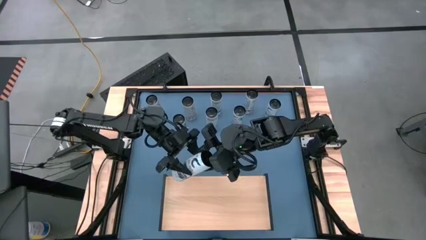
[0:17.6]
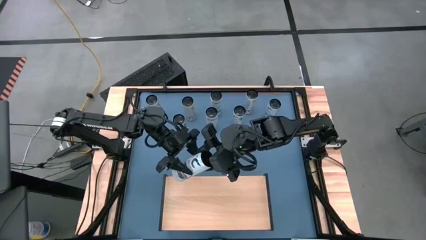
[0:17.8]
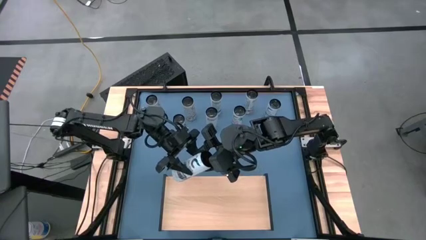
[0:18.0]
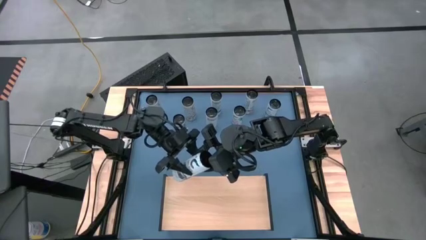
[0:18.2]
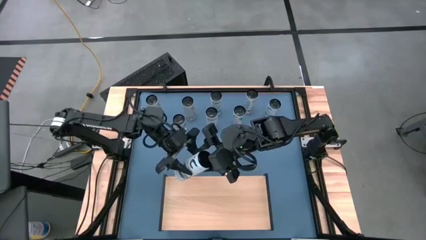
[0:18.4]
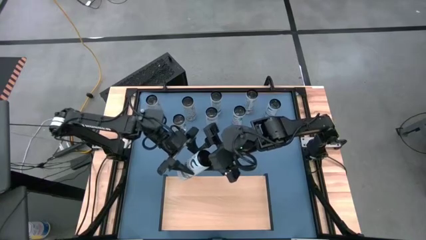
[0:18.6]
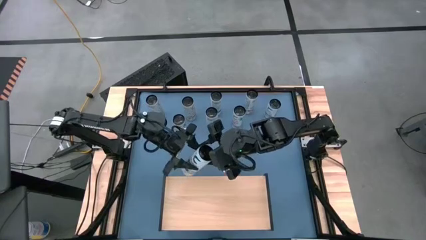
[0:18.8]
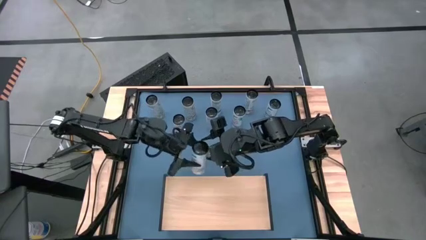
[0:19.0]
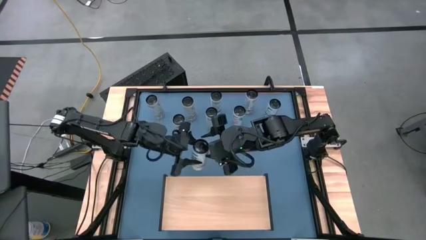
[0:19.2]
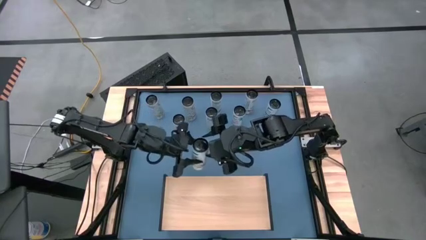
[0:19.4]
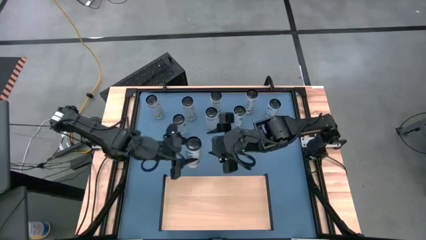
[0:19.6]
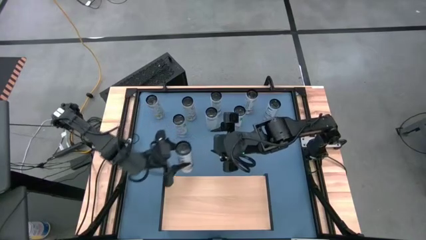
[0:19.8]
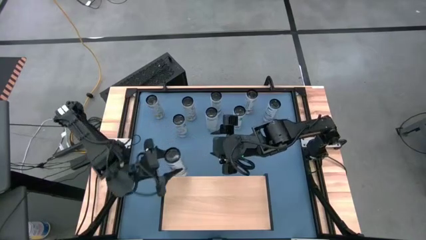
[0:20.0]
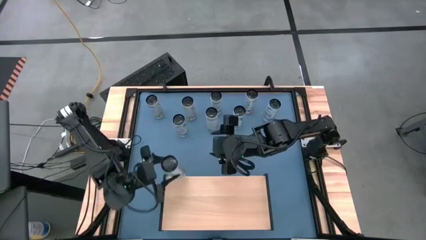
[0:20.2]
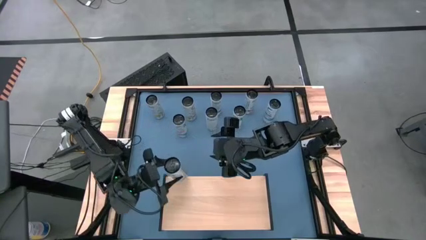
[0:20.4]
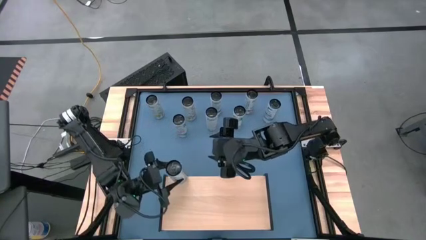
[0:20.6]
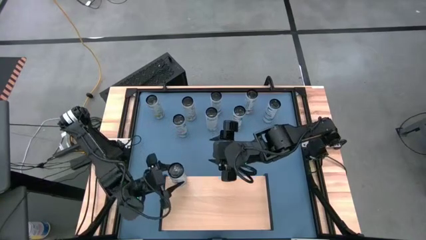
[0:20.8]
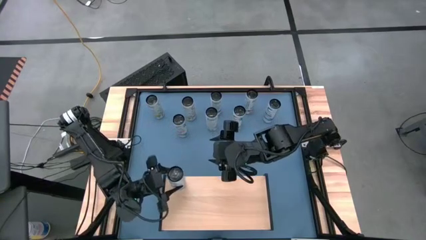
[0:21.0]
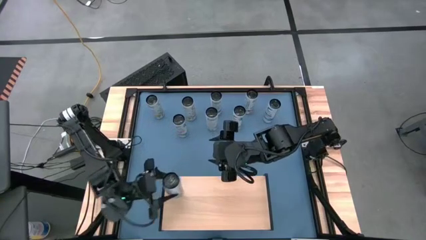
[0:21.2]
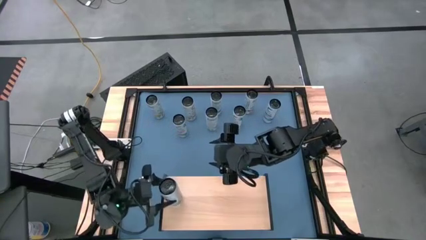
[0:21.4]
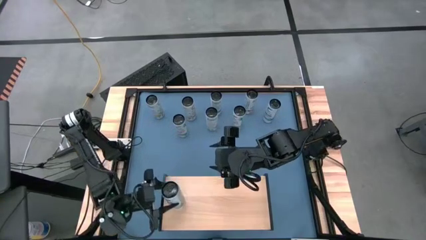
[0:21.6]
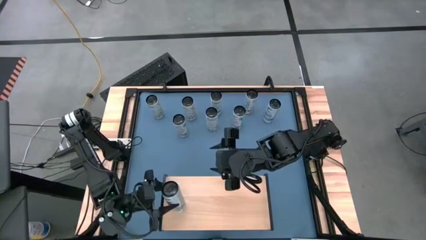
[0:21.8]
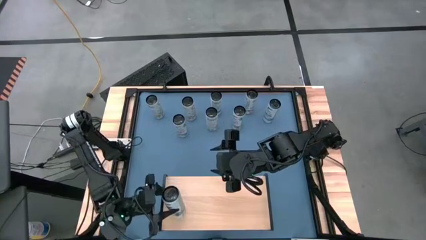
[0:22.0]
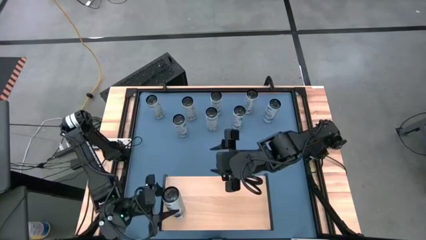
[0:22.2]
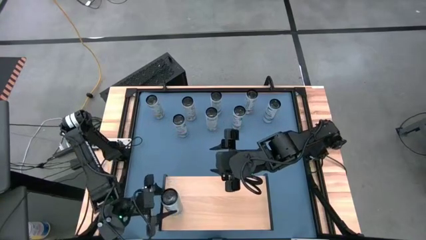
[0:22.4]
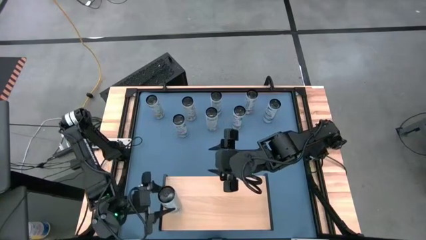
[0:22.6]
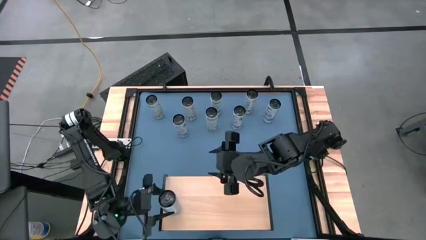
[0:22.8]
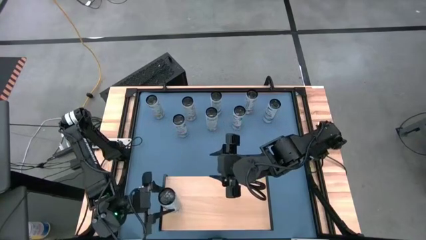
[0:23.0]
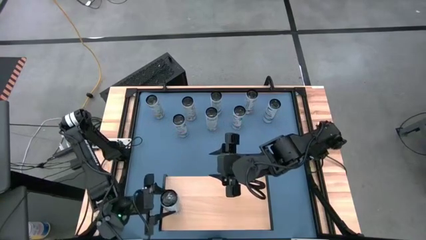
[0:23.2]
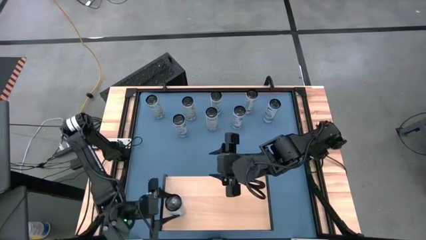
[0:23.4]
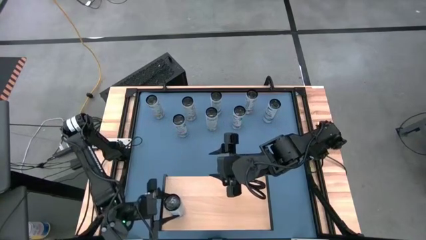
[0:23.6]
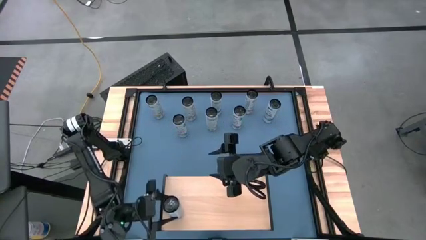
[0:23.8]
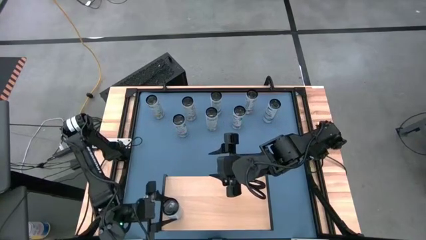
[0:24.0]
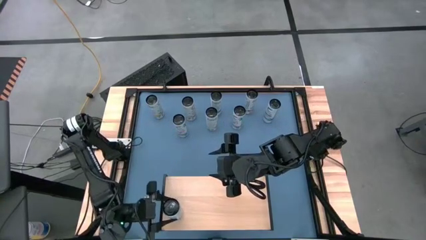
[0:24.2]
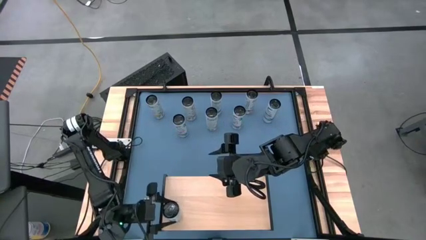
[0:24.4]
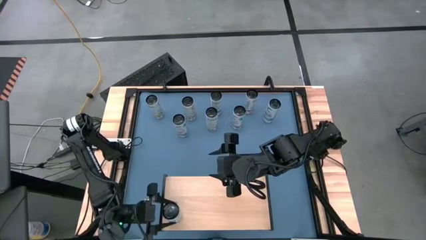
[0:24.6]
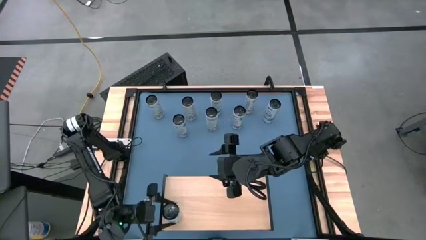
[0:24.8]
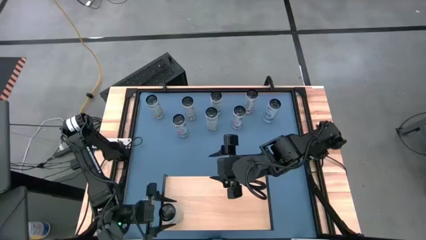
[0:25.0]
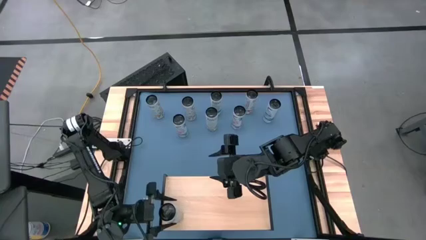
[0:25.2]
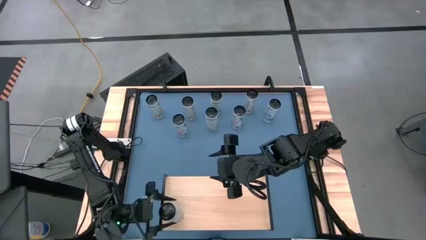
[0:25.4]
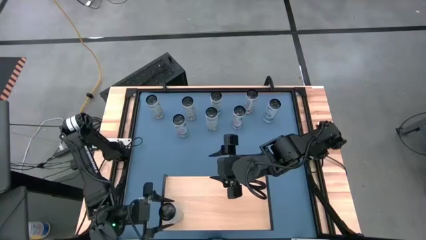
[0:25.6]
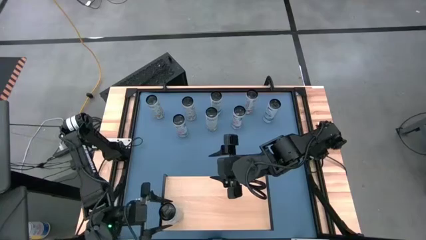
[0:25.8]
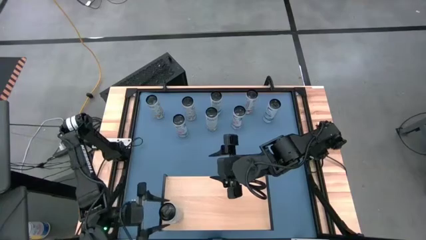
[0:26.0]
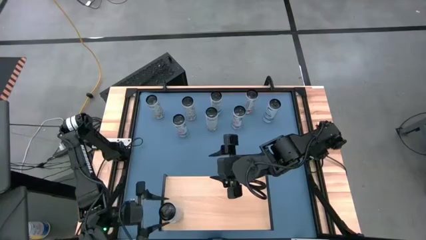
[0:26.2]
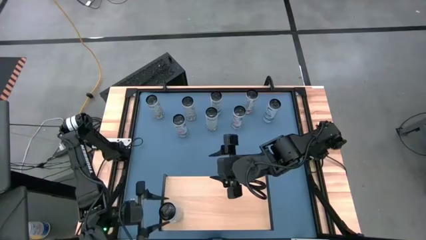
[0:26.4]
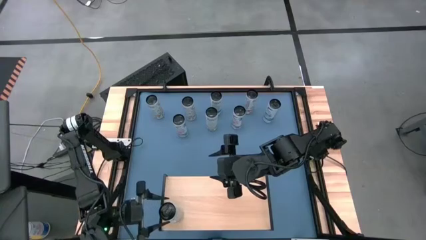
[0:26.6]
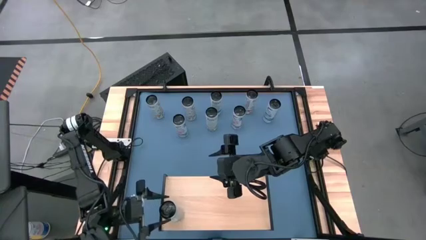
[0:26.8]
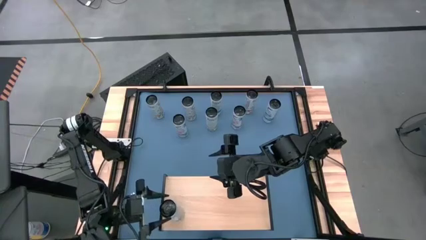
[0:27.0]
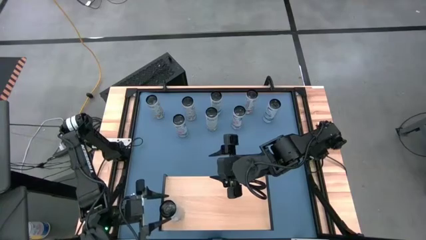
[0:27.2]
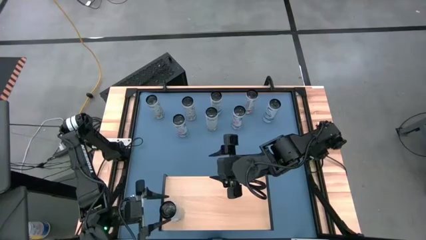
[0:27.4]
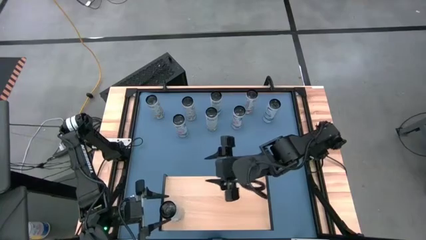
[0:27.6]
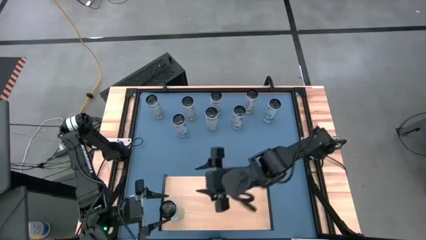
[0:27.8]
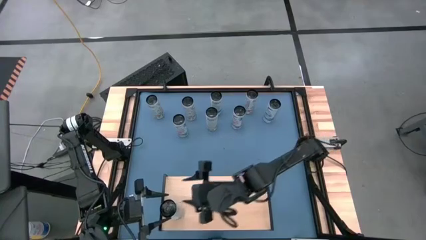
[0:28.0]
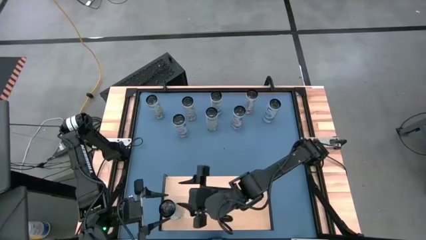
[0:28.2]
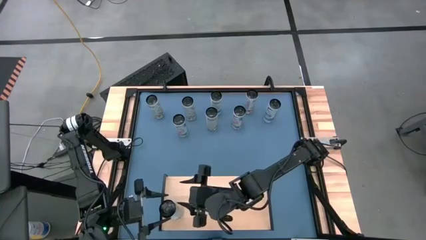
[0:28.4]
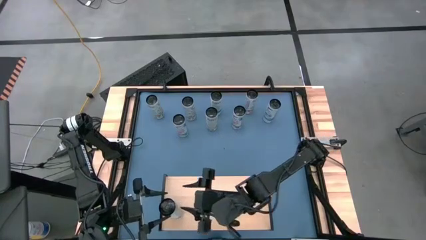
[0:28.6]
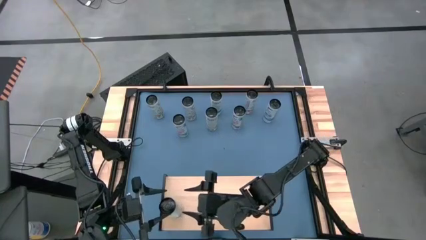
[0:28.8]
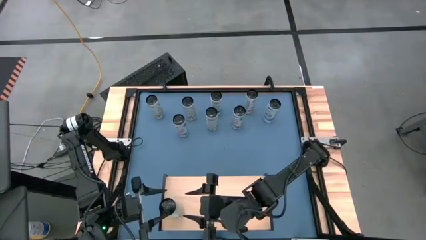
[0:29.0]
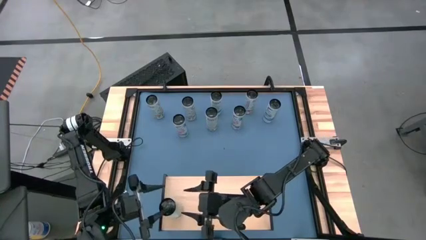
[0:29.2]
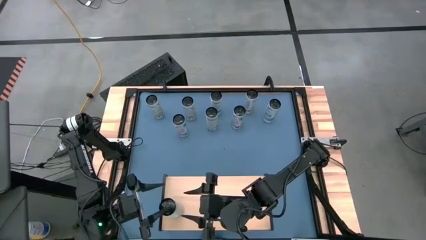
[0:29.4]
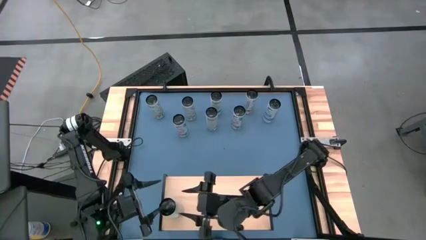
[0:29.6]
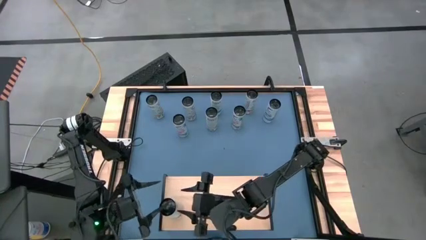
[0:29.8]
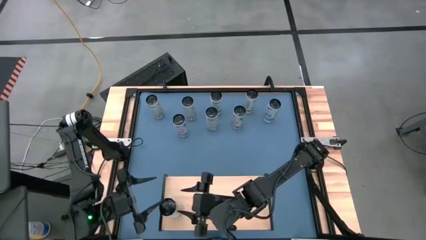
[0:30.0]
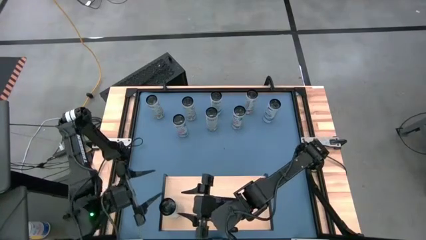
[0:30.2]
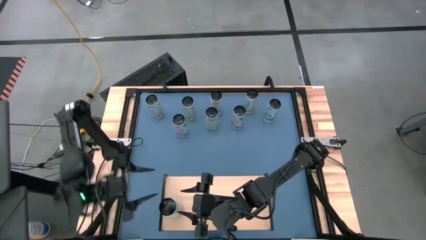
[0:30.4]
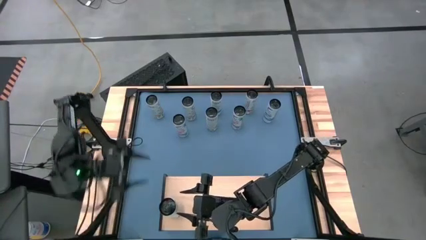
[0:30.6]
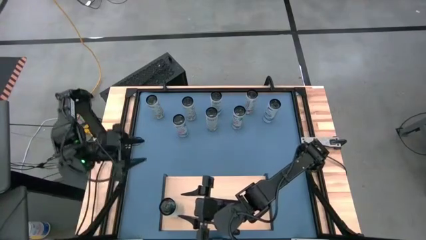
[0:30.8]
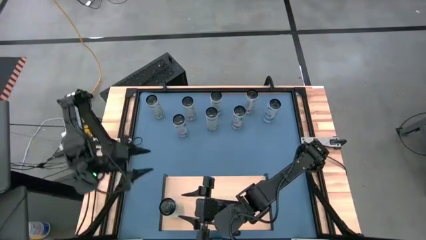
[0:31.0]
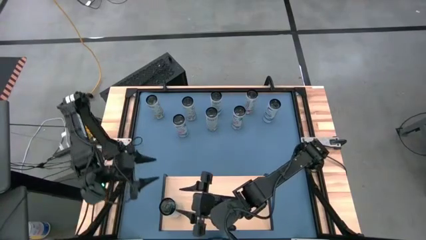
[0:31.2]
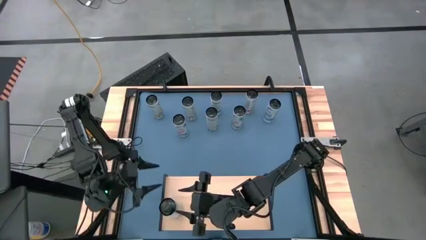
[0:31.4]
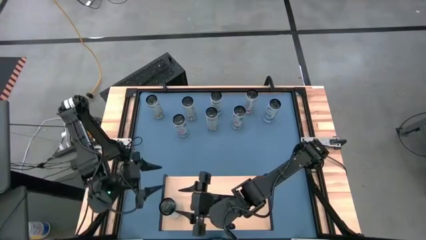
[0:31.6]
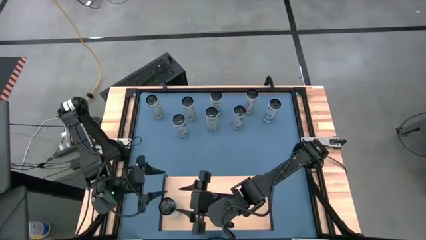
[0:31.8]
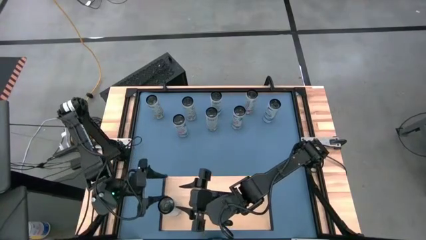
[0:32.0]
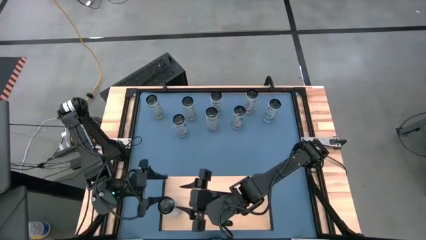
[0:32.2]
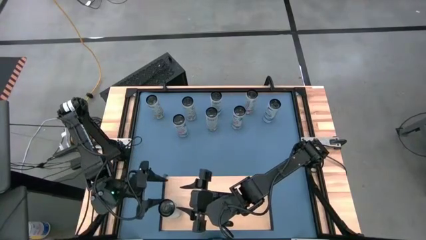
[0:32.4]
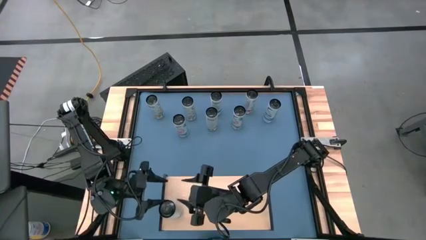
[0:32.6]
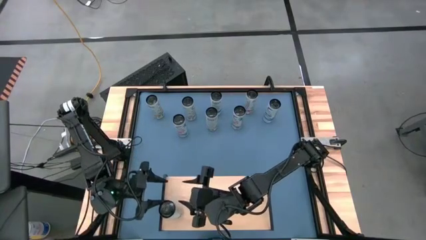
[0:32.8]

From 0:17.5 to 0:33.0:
Task: Place canned beverage on shelf
Put the bottom right white blue soda can on the shelf
